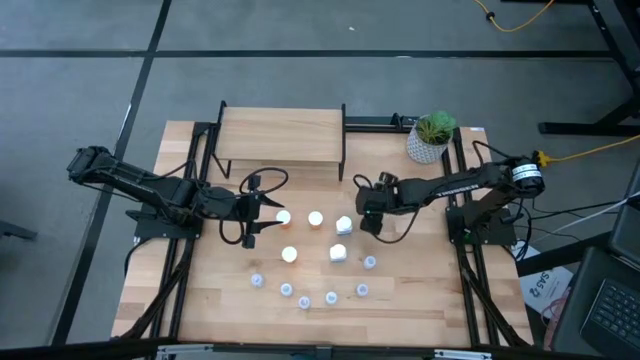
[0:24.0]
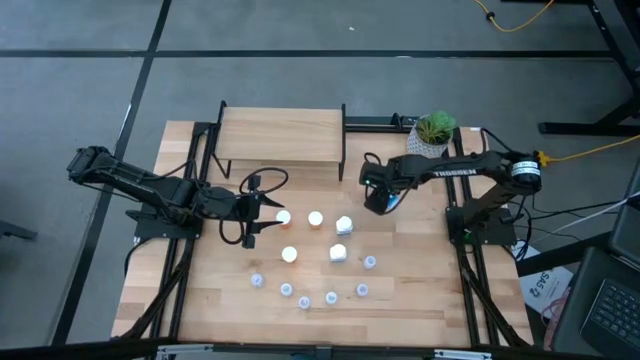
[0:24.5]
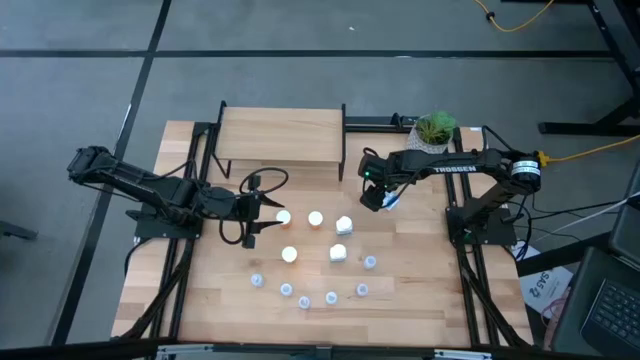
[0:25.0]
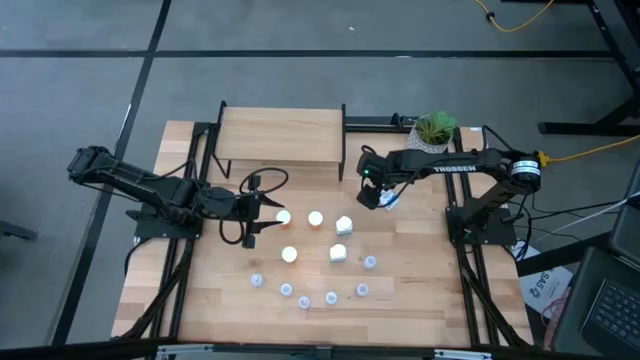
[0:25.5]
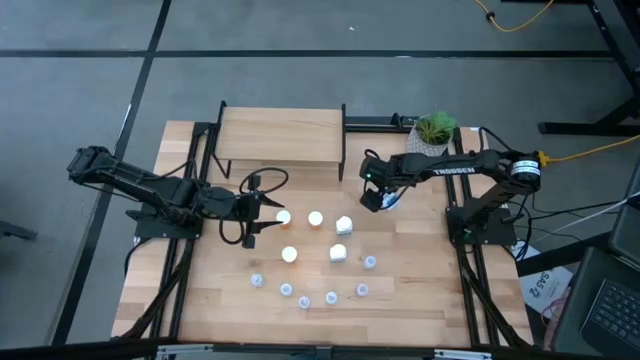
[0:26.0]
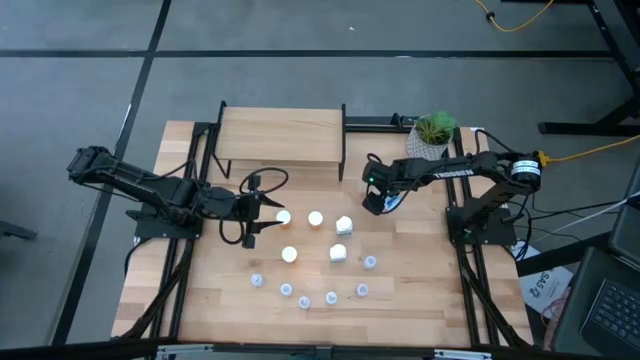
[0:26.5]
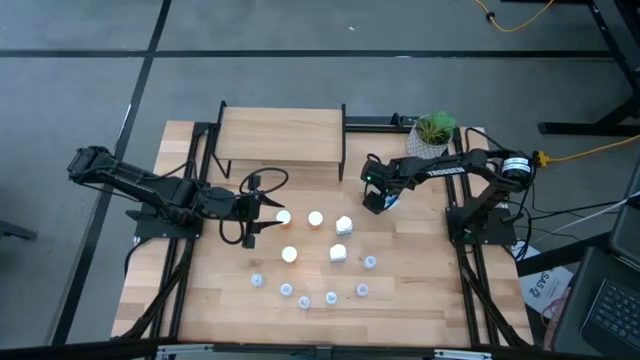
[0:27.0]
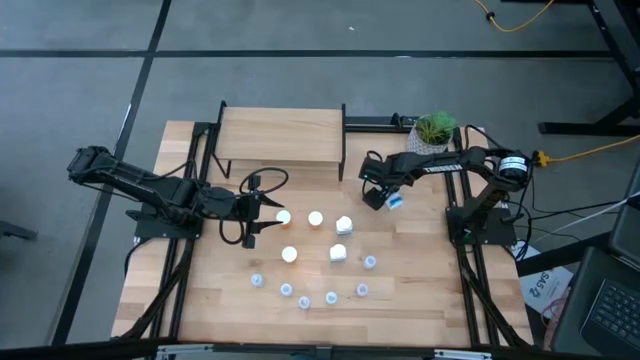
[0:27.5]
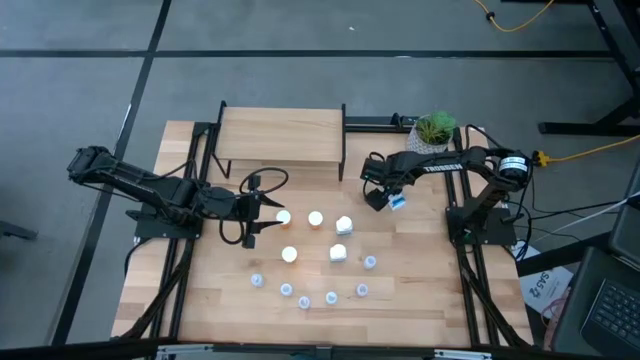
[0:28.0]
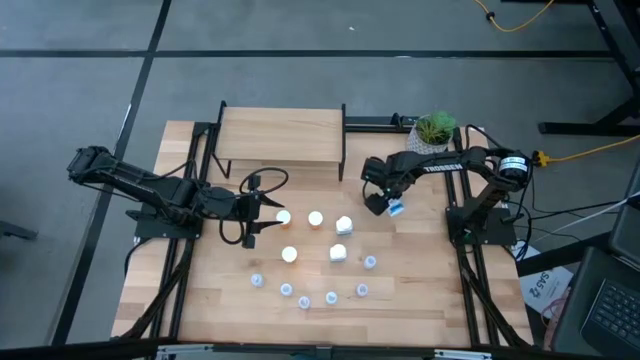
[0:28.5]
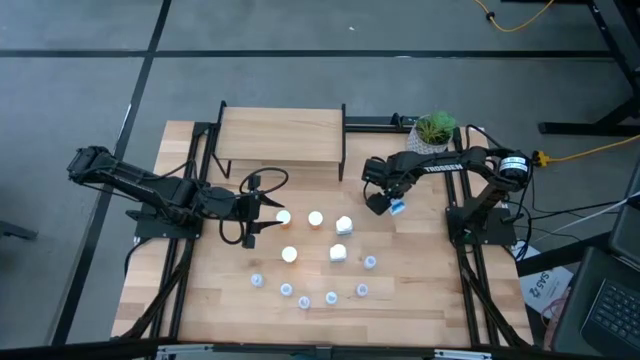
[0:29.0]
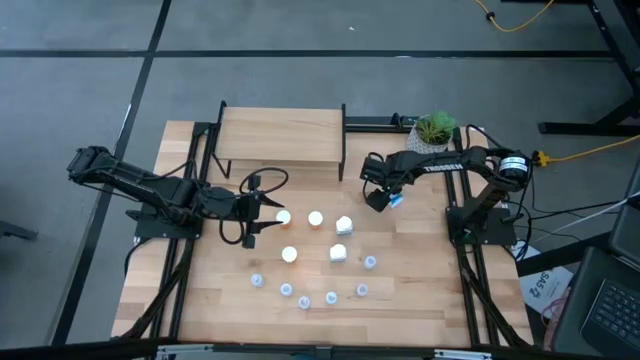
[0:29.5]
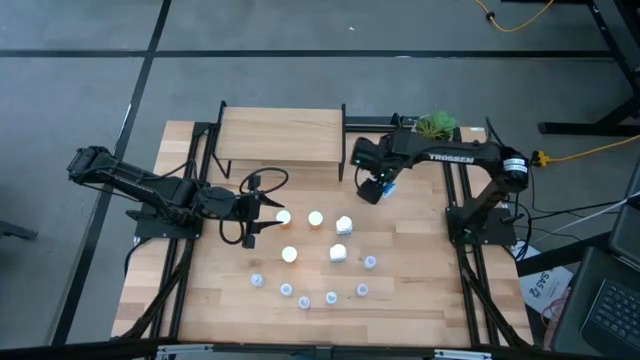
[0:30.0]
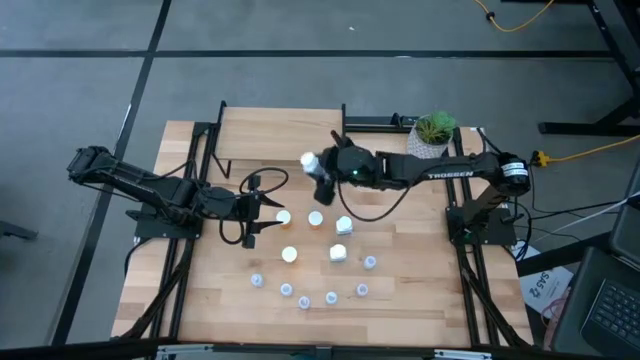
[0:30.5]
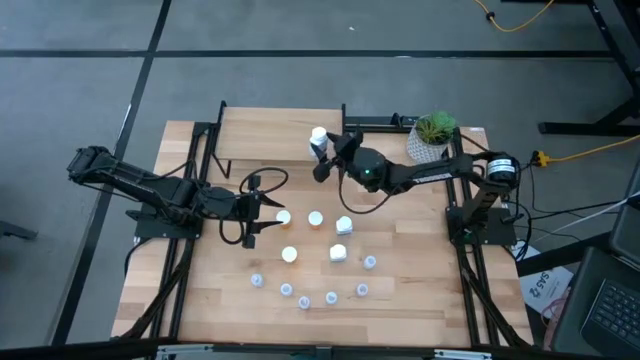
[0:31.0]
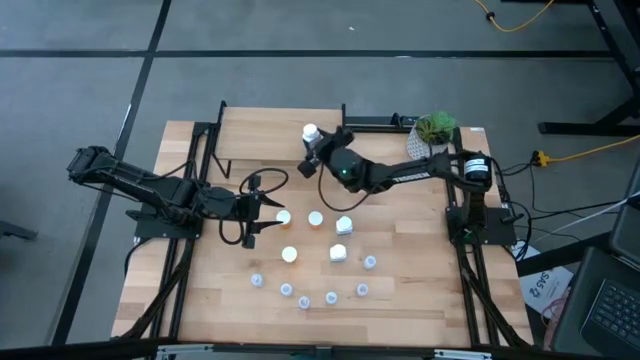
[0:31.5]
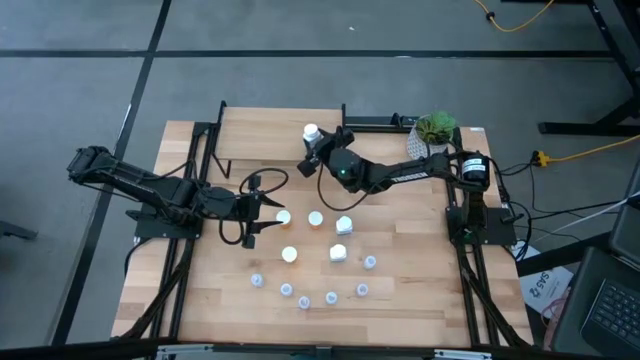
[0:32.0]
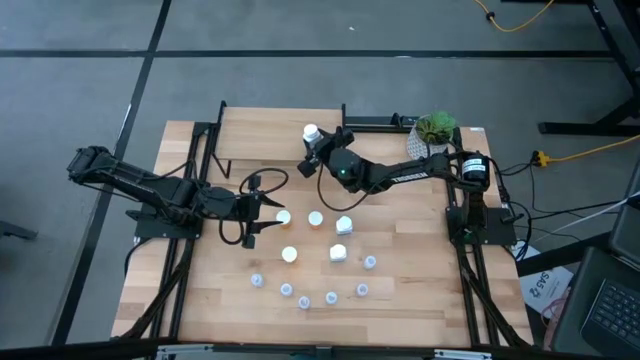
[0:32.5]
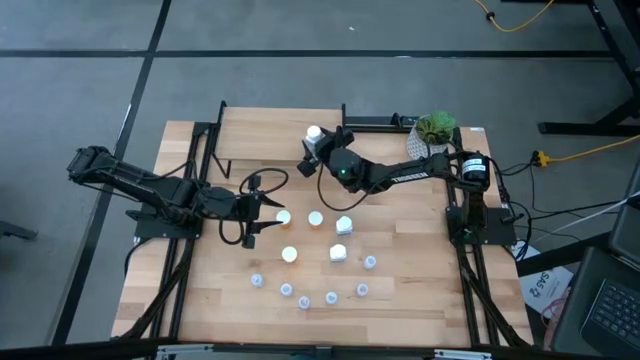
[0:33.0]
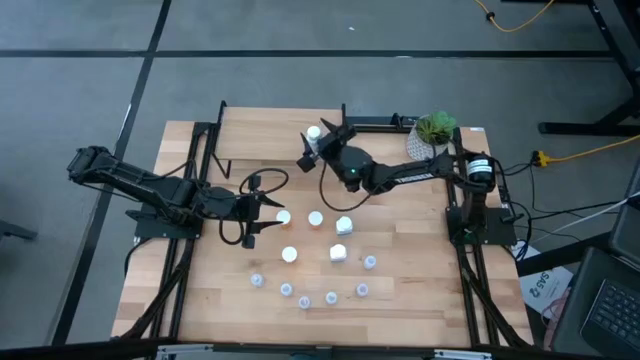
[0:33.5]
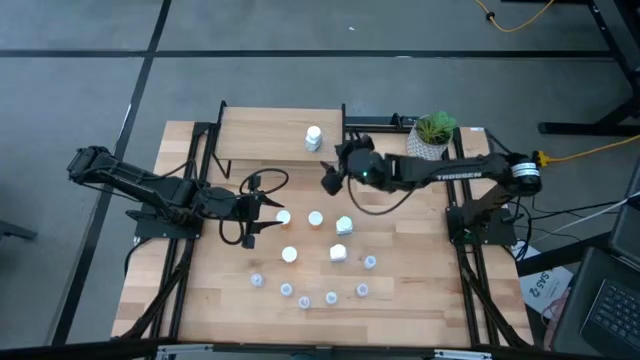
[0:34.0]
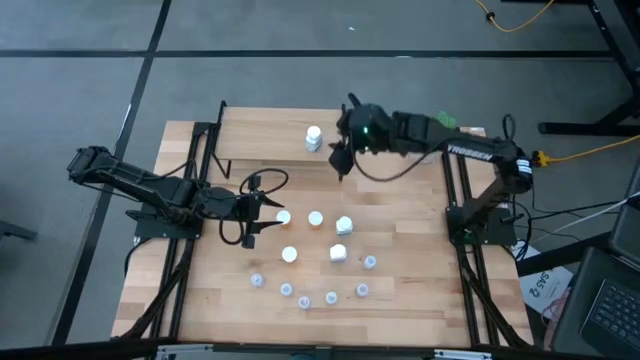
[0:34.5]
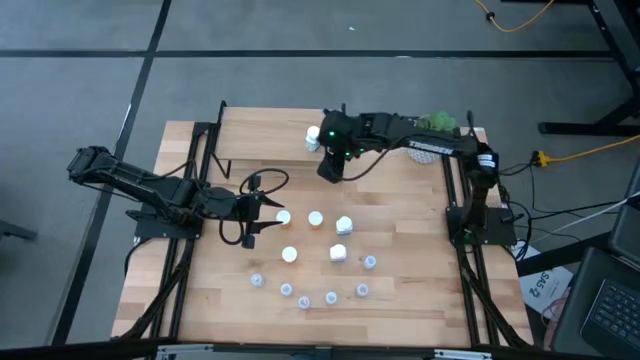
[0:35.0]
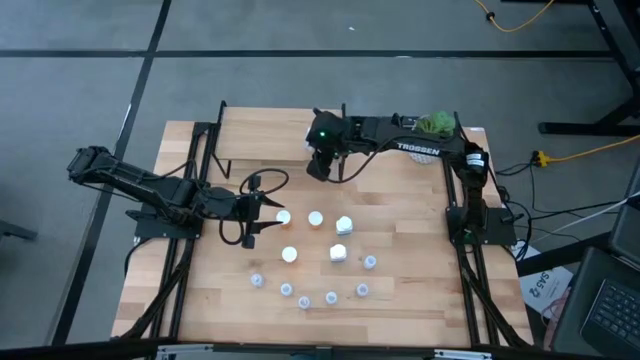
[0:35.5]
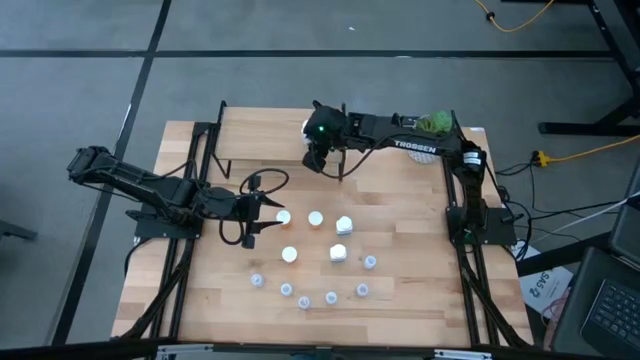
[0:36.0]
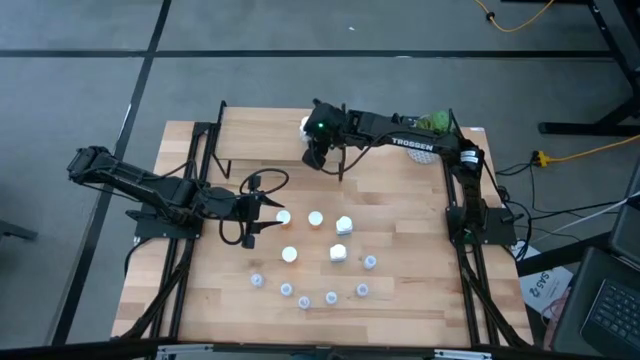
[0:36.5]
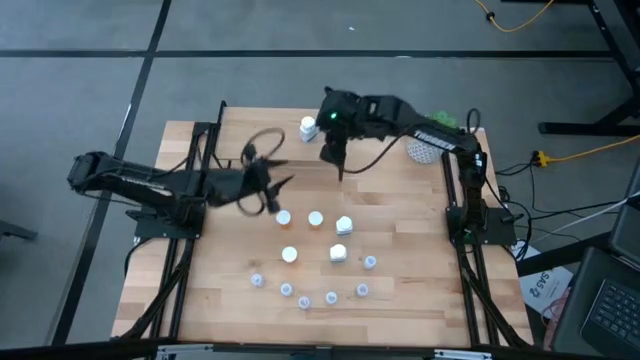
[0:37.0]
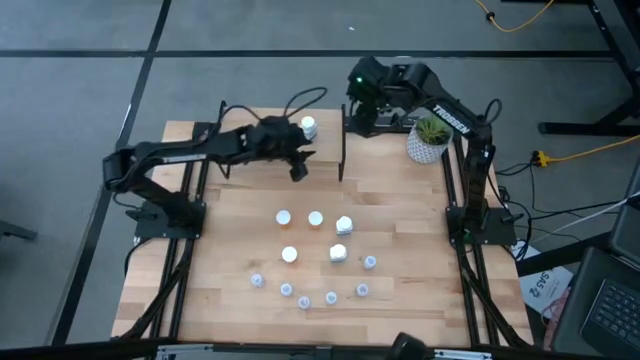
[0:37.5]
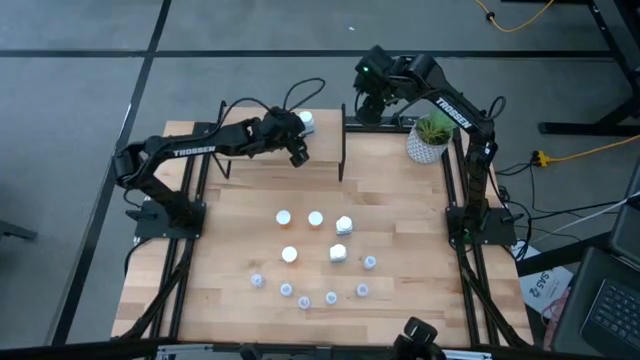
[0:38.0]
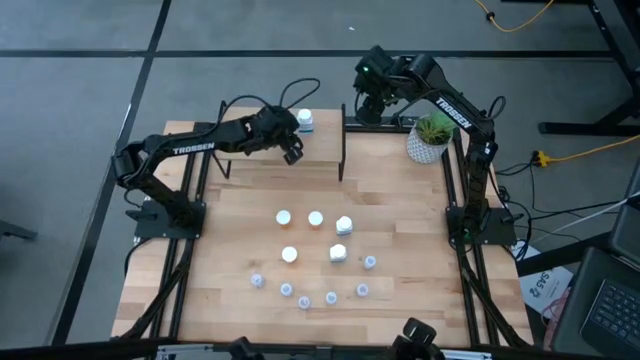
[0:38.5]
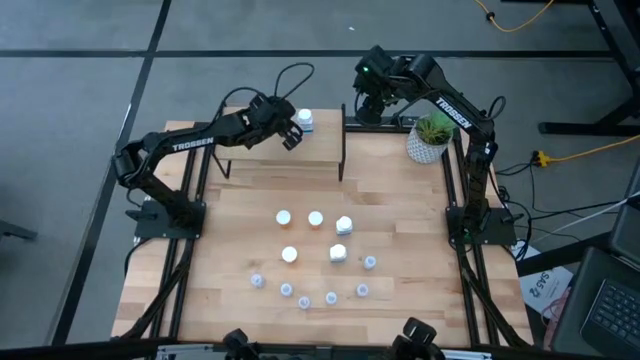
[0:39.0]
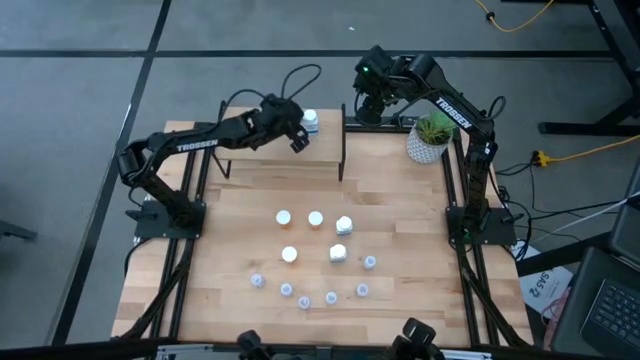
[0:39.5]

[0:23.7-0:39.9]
Task: Pick and place medicine bottles onto shelf by color
Put the top right blue pill bottle on the shelf

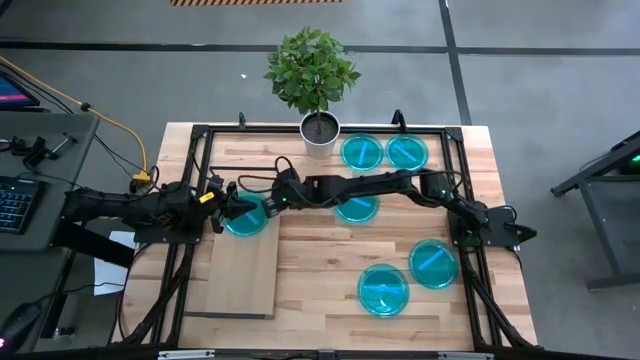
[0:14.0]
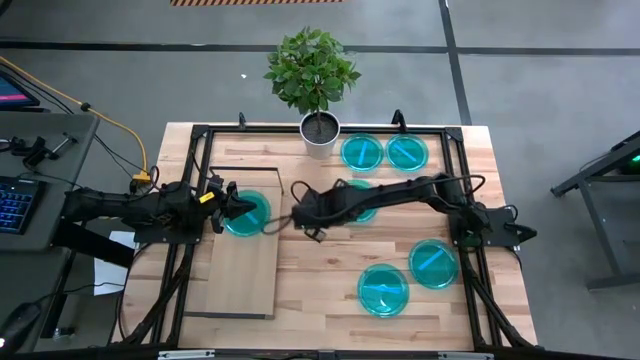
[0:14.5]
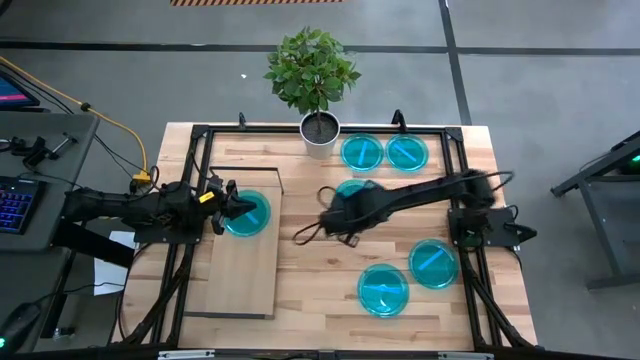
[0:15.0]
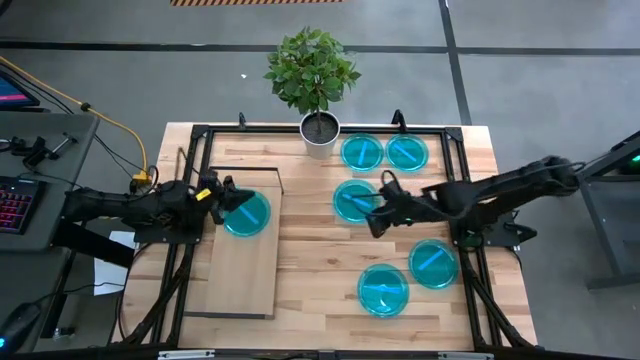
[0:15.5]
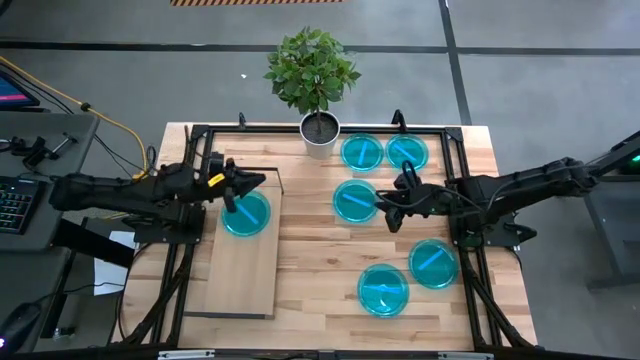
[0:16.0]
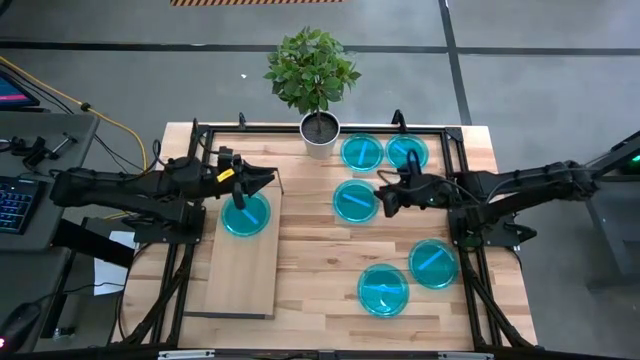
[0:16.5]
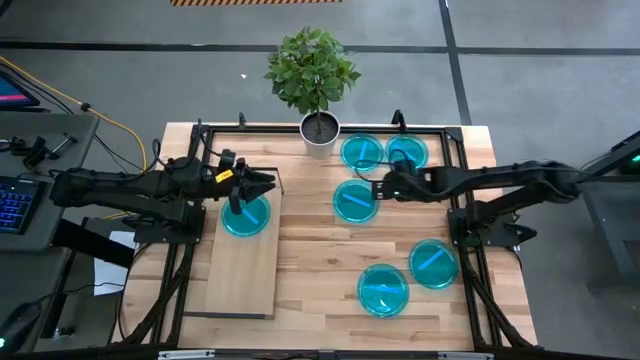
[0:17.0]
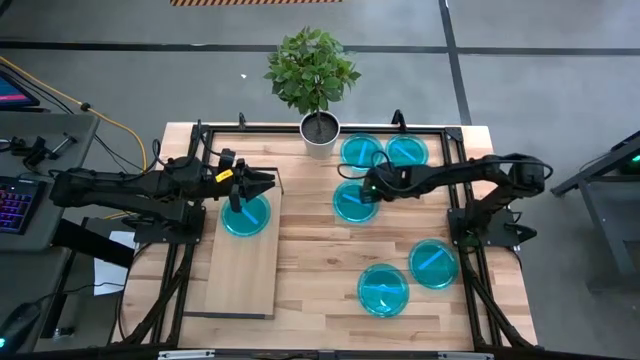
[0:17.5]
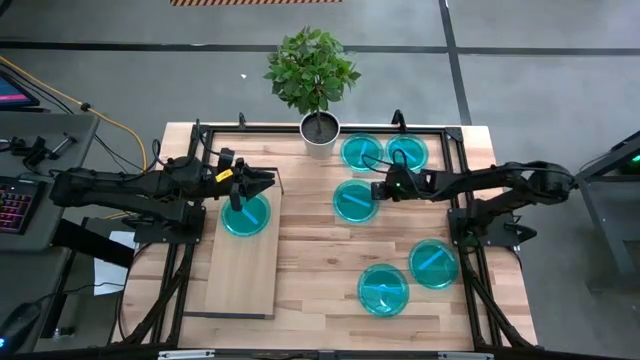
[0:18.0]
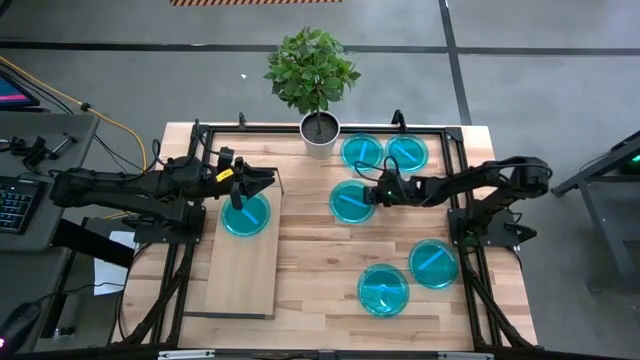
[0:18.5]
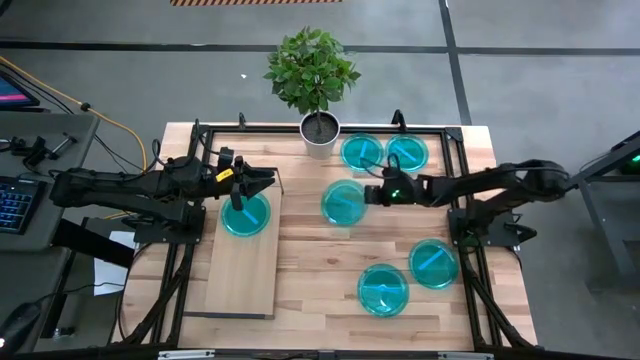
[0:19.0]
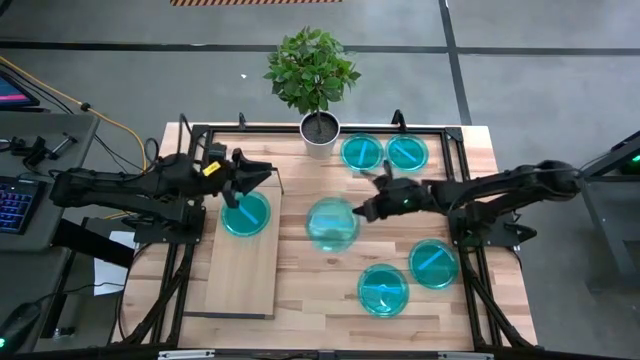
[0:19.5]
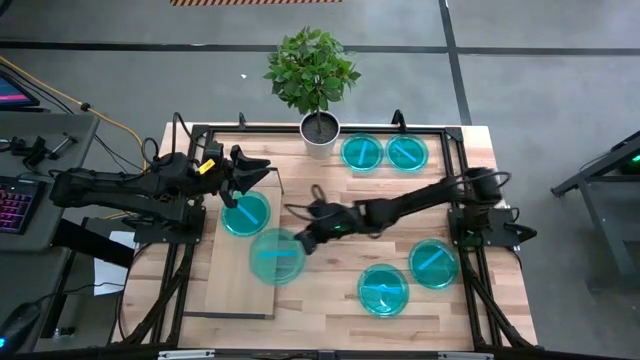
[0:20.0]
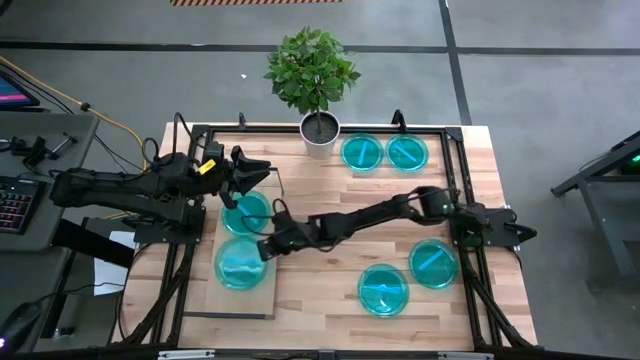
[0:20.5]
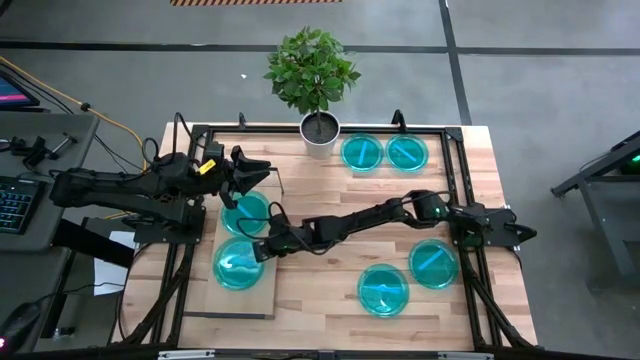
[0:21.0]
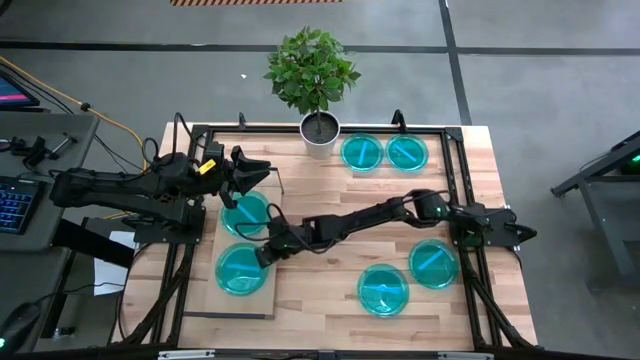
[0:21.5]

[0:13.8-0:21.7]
Task: Place and stack plates onto a shelf
Put the middle blue plate on the shelf
